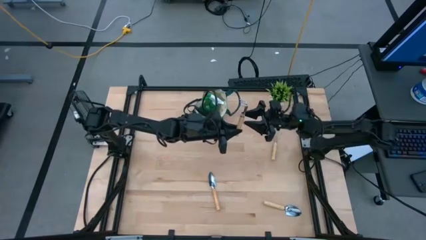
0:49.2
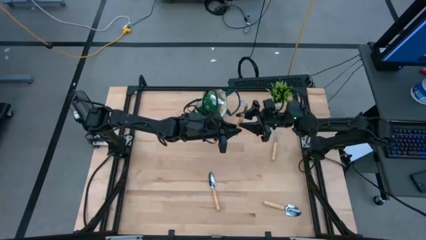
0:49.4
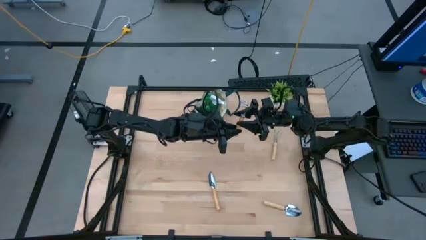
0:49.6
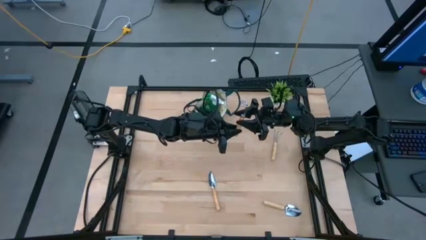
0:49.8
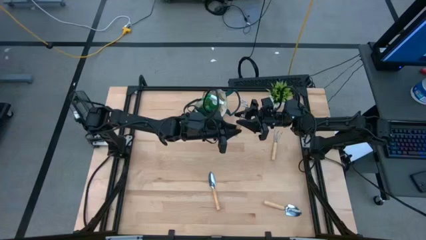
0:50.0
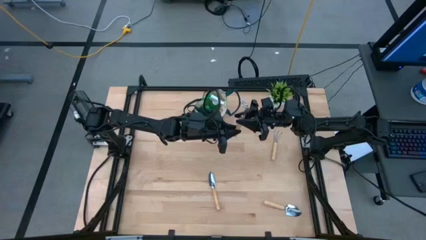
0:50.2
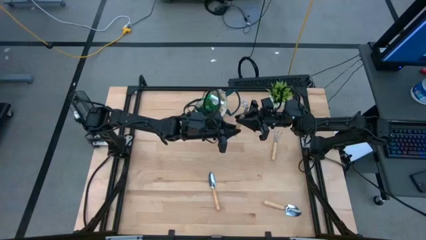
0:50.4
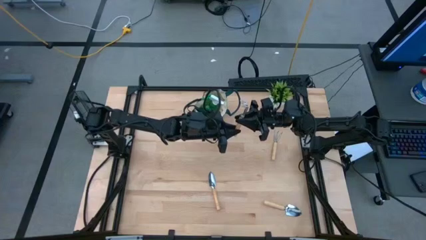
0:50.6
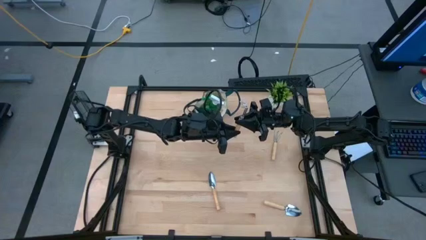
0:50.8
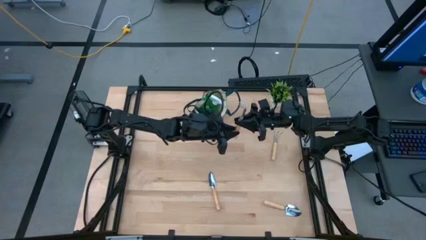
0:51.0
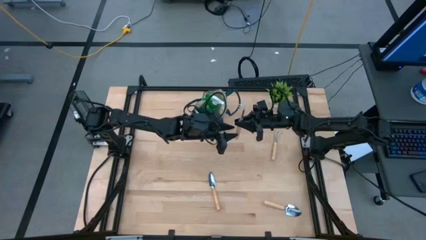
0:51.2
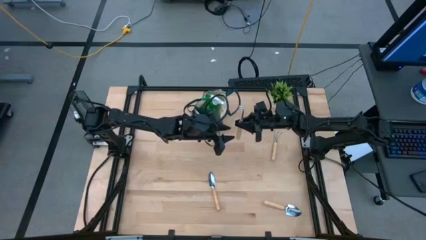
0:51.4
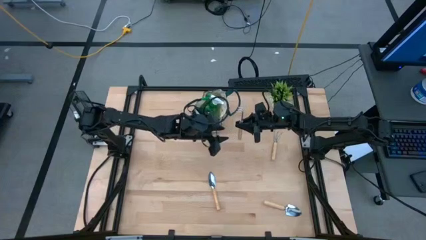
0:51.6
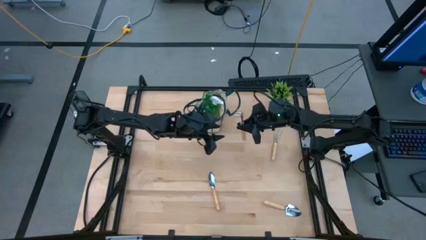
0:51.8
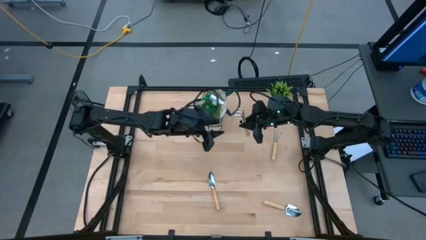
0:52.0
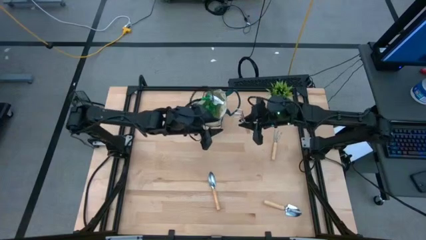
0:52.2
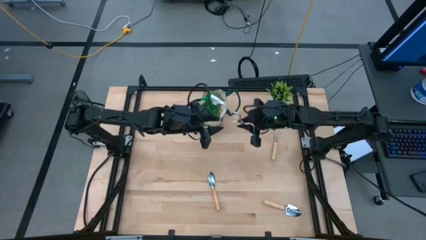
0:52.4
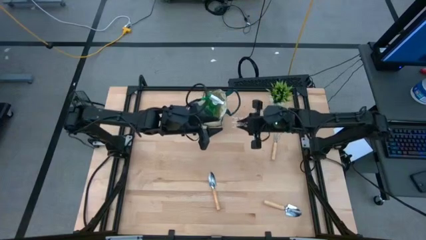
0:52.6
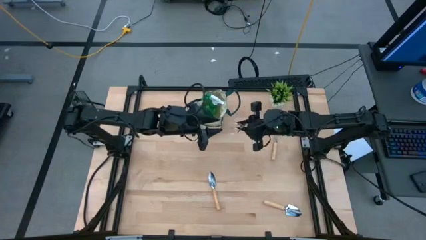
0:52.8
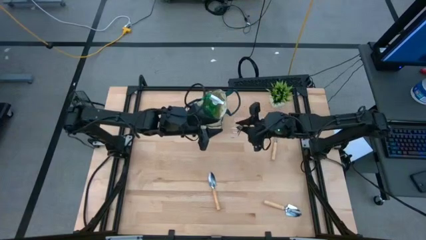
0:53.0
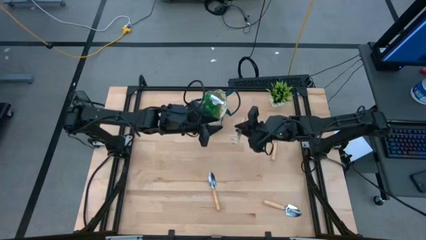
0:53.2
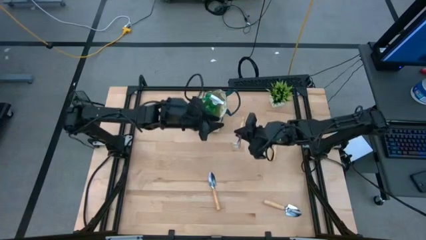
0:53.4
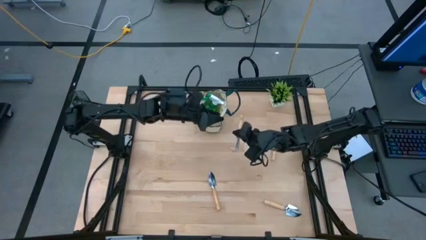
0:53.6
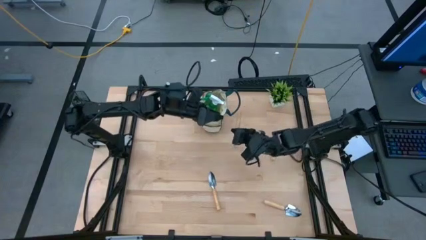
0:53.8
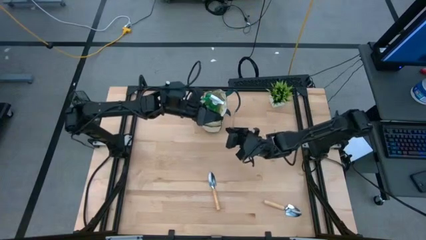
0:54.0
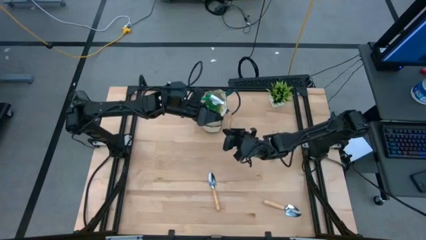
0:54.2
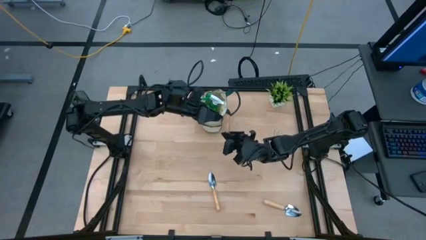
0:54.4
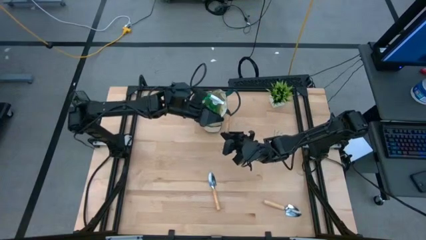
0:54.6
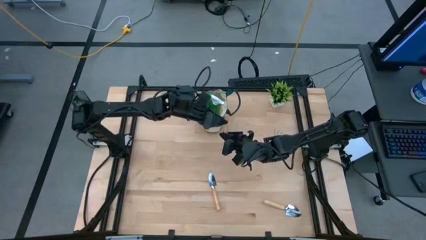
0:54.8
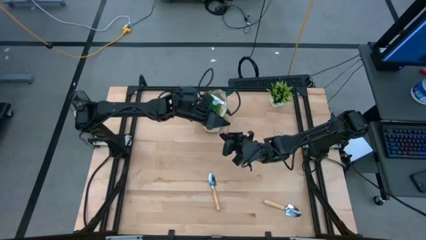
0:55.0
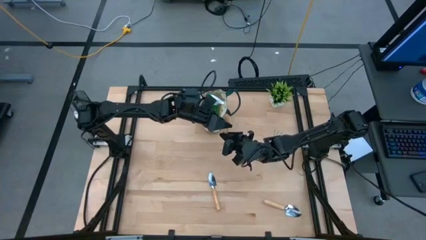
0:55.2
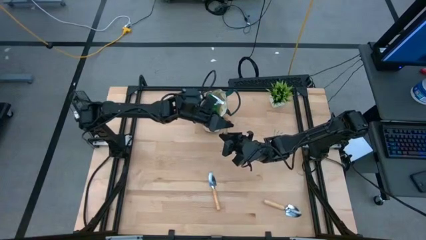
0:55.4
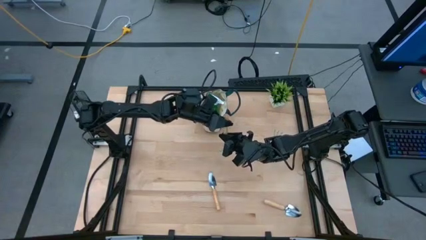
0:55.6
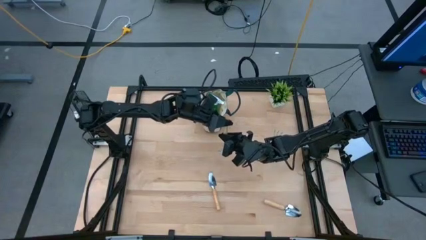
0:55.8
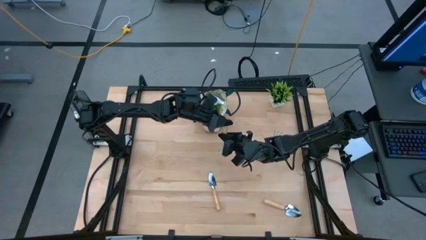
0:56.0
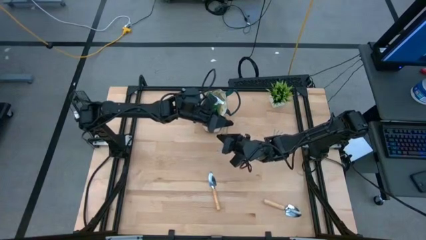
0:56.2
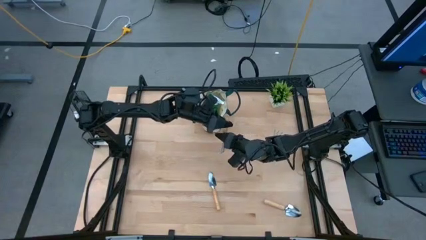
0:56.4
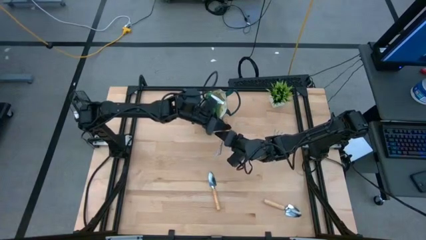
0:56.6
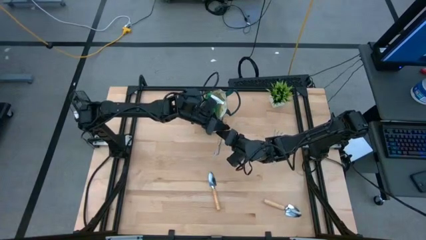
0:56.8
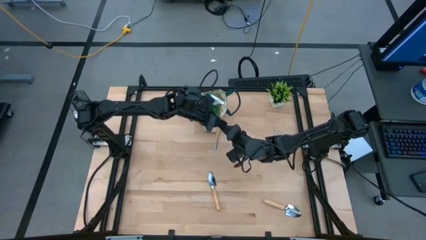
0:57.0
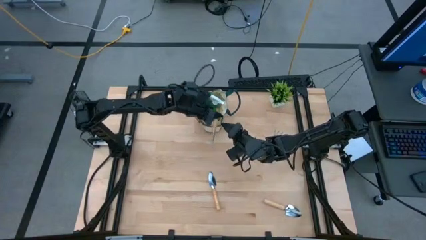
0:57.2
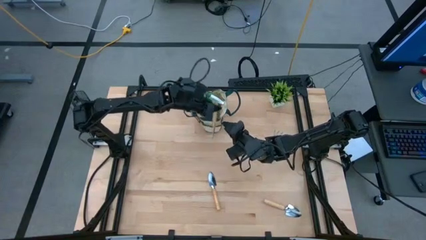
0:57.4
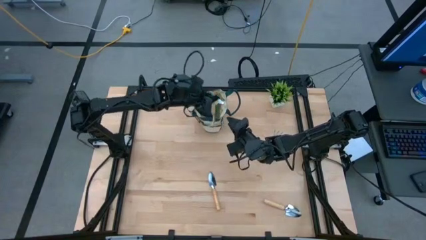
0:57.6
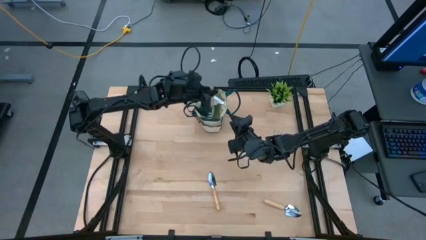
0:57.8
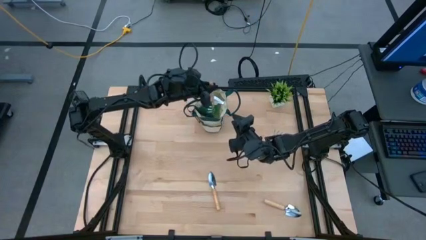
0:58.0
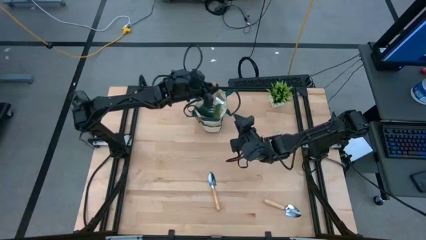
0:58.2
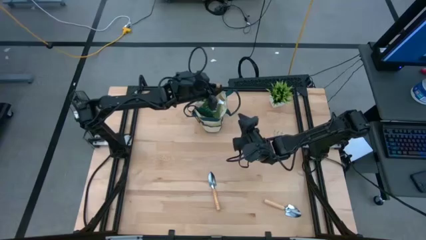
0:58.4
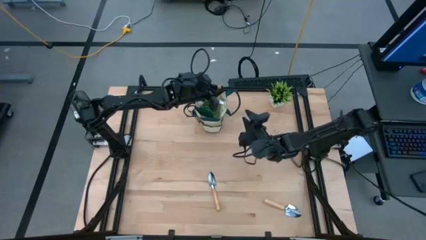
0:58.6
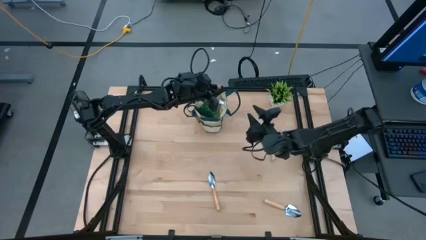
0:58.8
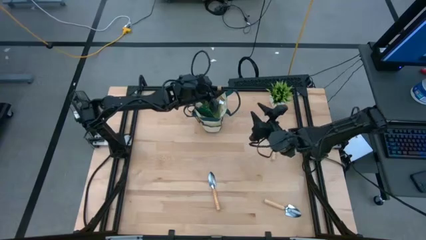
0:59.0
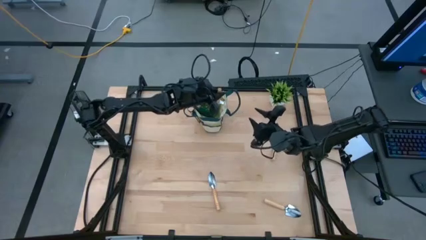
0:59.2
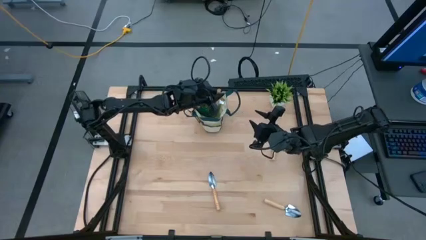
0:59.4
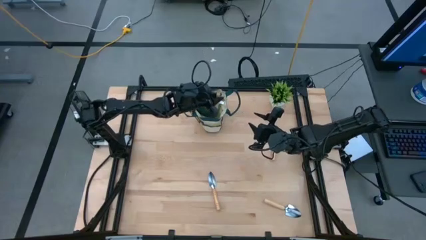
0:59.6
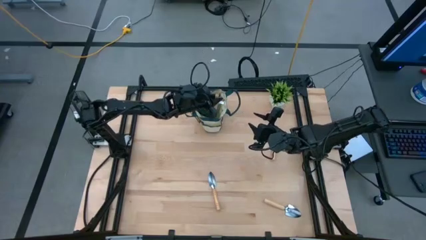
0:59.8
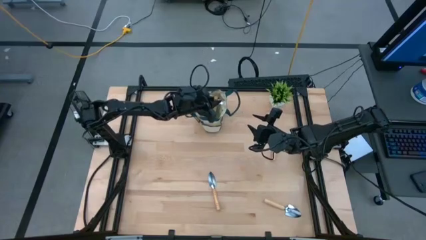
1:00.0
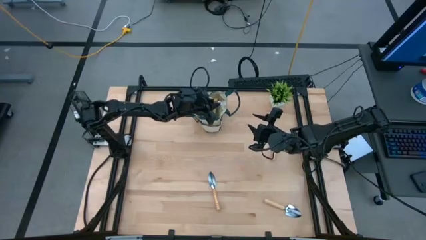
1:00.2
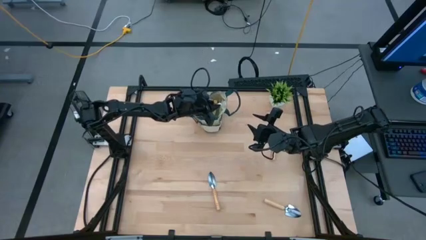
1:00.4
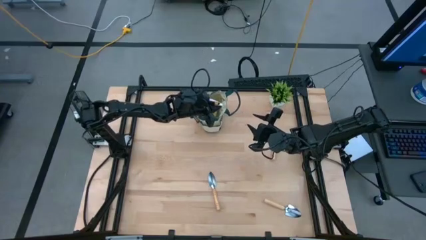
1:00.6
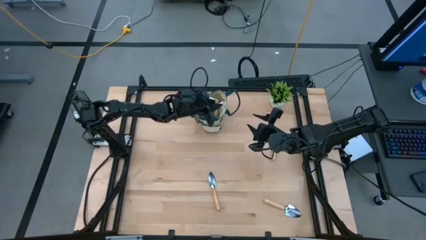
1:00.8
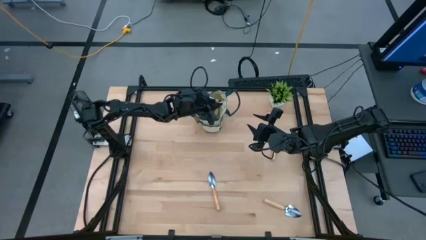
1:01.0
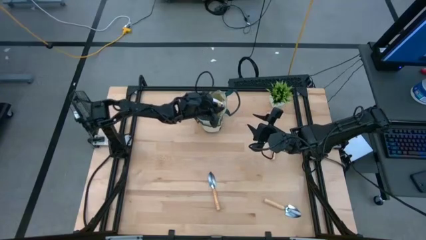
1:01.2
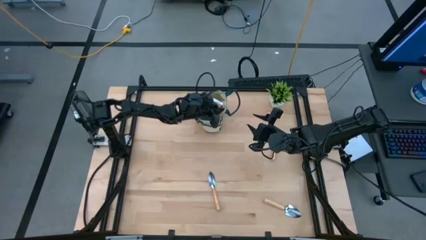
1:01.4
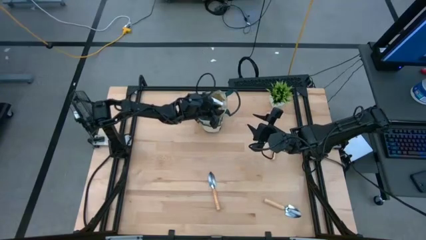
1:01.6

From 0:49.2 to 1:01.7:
Task: Pick & Place Garden tools in Gardening bag
Put the bottom brown hand rake into the gardening bag

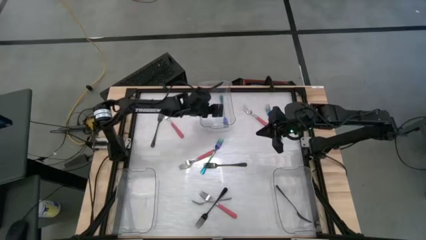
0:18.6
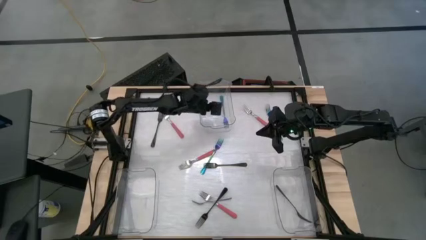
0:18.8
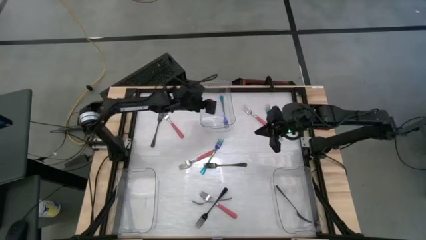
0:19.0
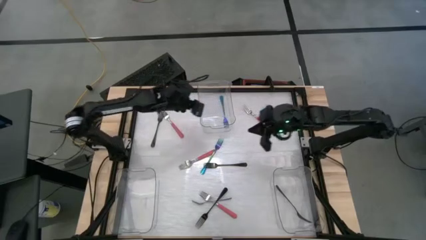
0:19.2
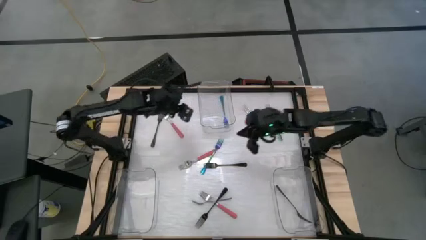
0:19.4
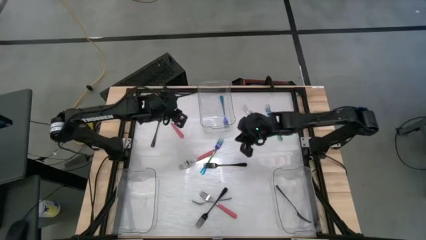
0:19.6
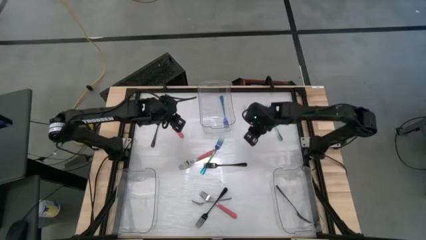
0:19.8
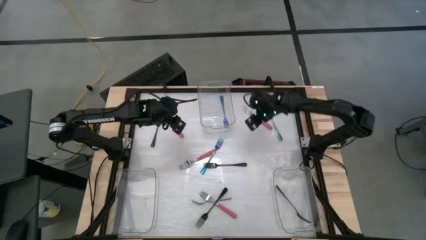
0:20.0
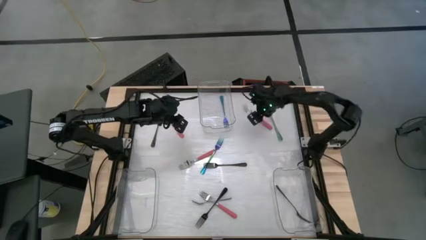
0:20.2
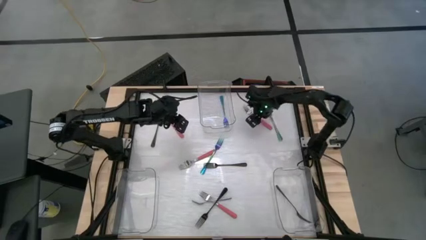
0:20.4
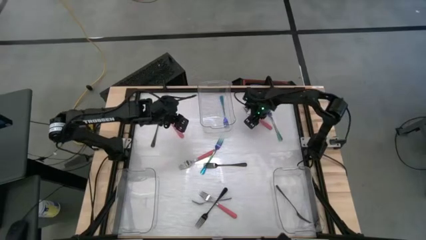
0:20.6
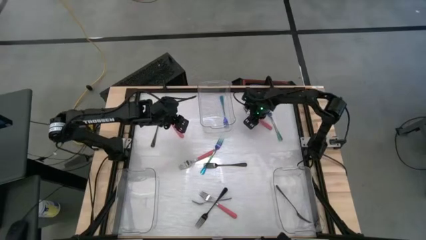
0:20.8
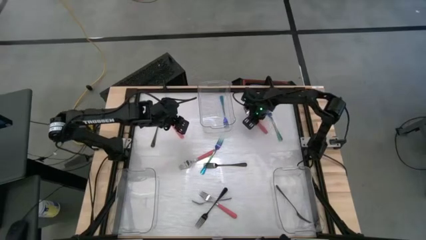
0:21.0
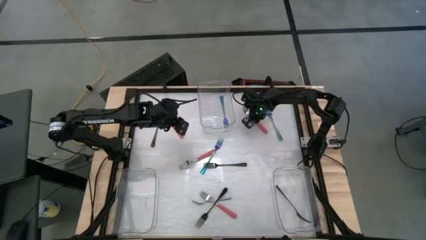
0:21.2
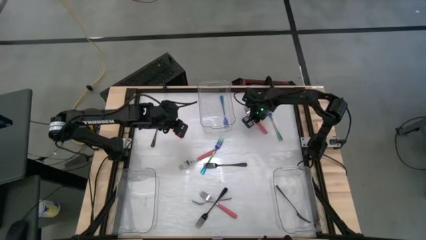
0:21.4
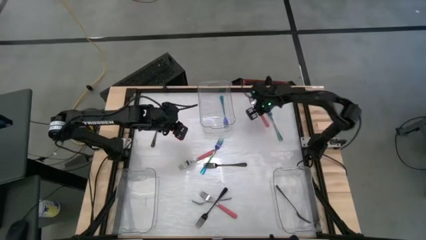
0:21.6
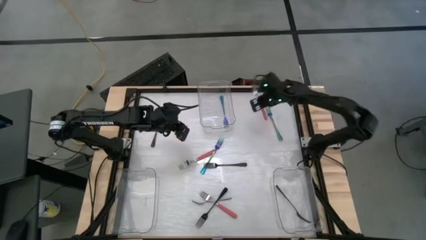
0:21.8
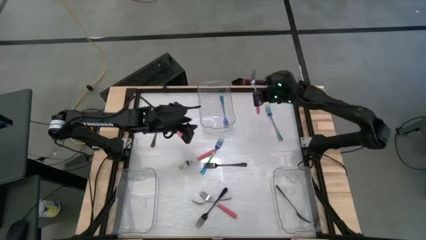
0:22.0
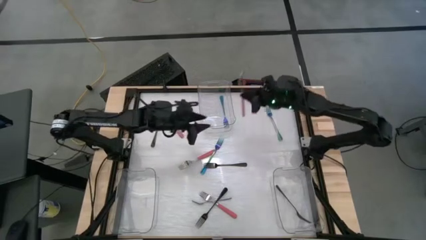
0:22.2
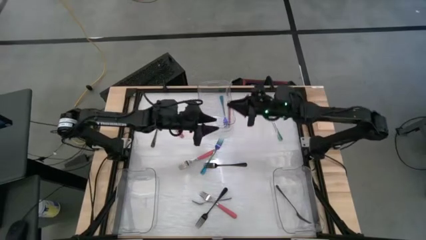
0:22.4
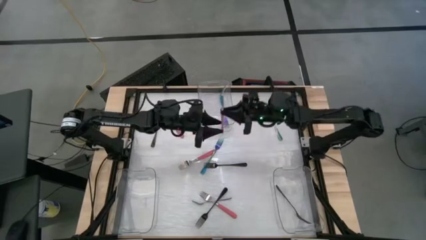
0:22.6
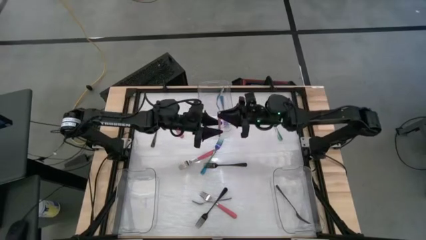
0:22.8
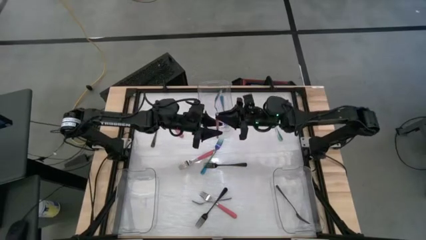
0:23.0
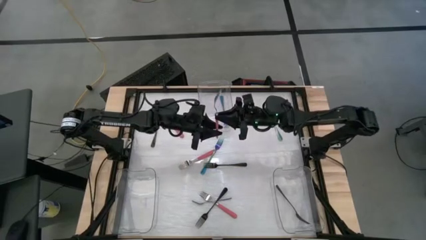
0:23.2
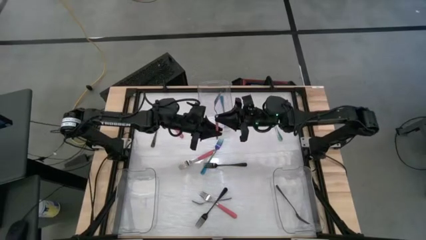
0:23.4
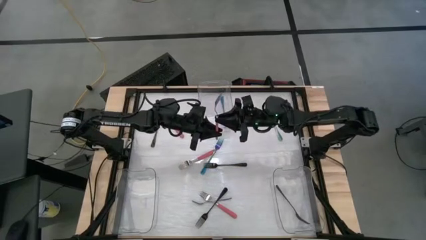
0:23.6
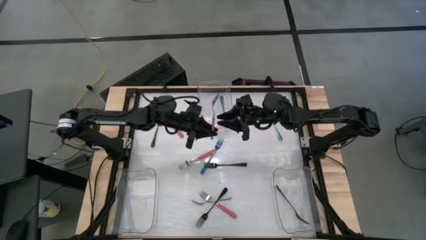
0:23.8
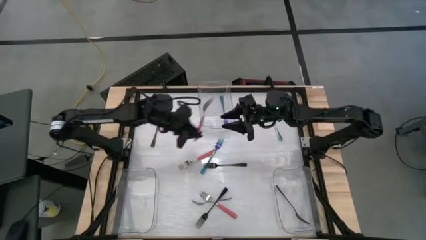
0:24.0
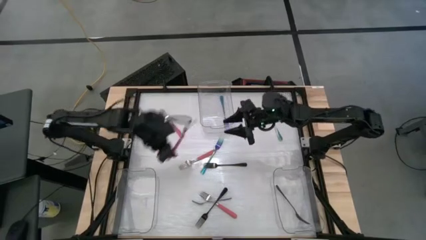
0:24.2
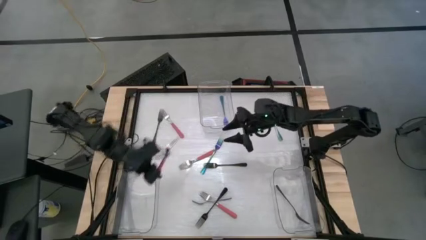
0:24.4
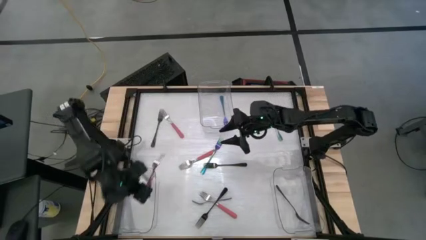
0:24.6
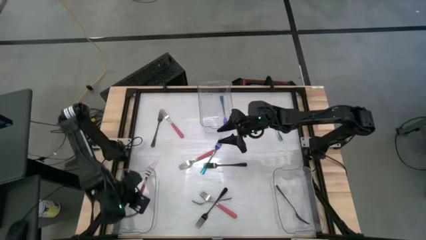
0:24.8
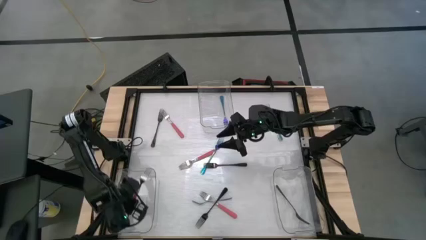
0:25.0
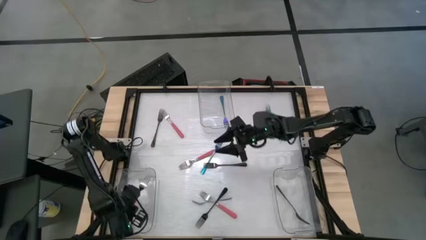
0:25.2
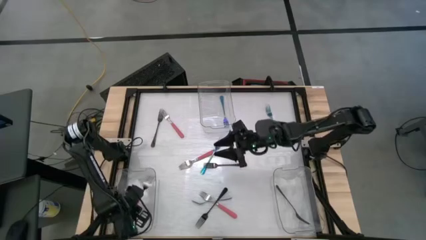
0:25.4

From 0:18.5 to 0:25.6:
Task: Sort silverware by color (type)
Put the pink fork into the bottom left transparent bin
